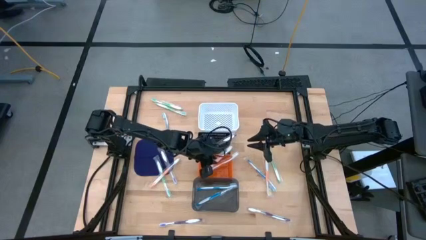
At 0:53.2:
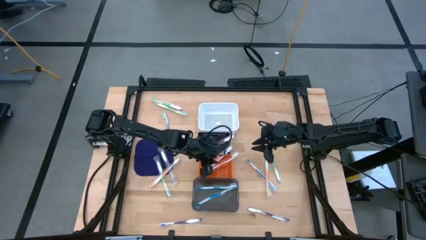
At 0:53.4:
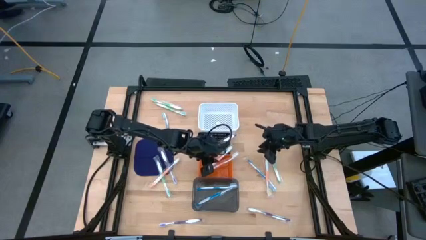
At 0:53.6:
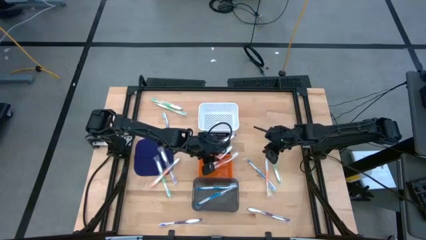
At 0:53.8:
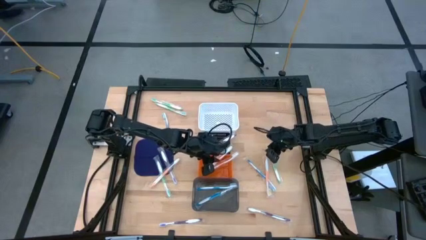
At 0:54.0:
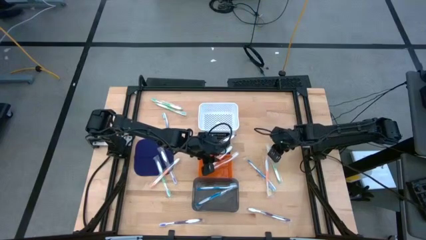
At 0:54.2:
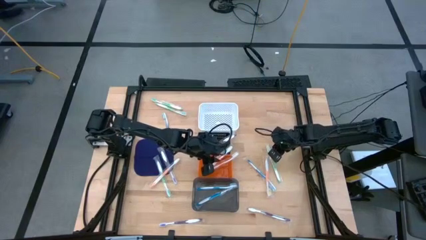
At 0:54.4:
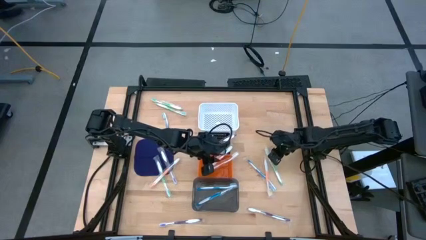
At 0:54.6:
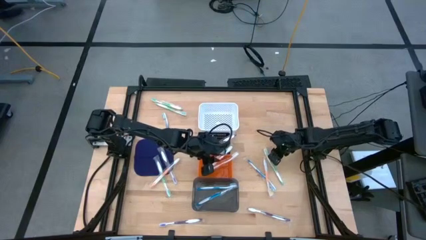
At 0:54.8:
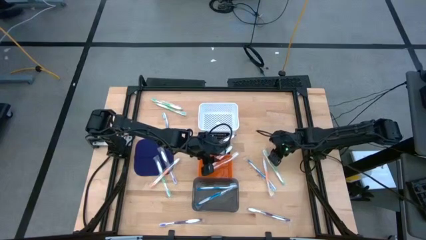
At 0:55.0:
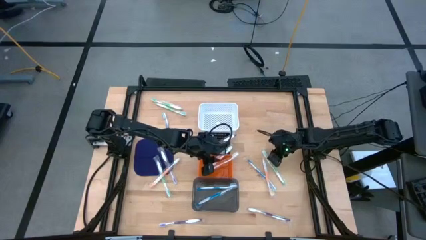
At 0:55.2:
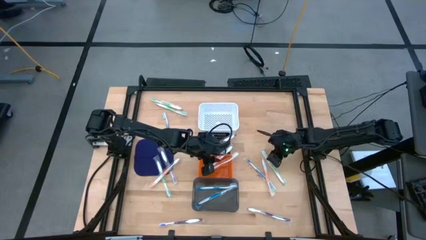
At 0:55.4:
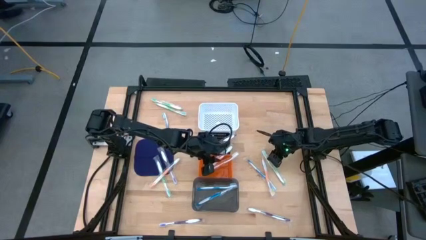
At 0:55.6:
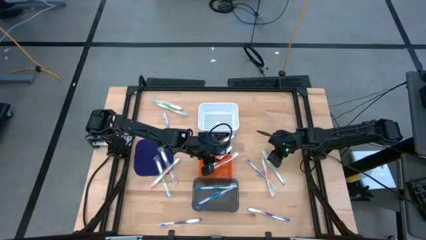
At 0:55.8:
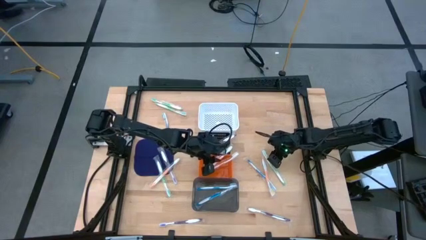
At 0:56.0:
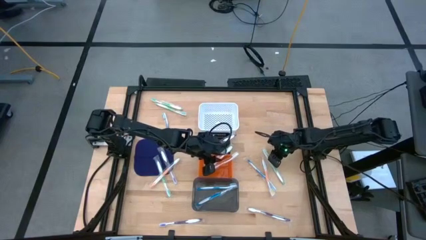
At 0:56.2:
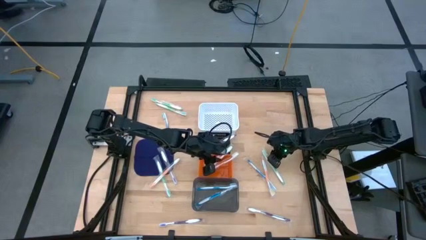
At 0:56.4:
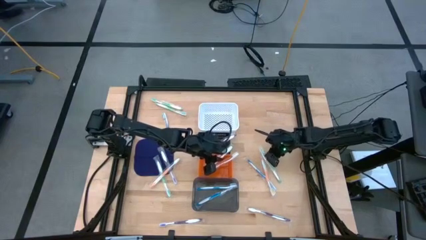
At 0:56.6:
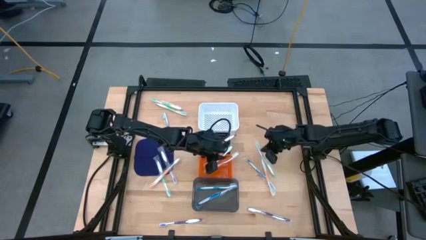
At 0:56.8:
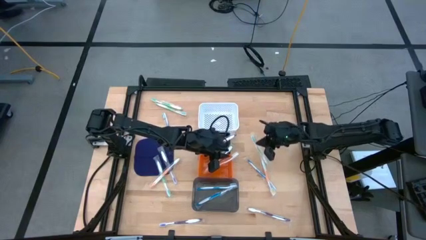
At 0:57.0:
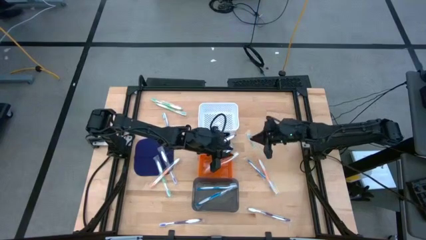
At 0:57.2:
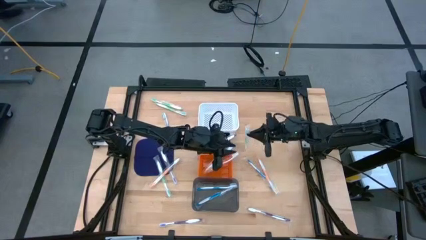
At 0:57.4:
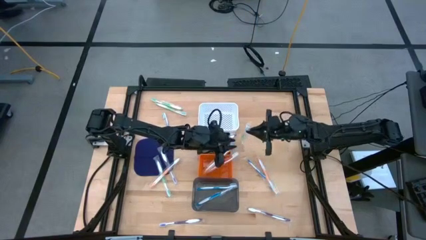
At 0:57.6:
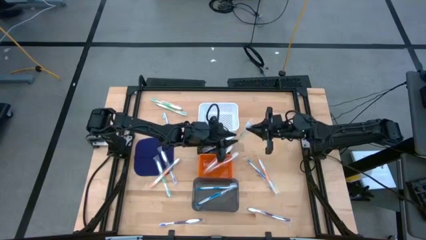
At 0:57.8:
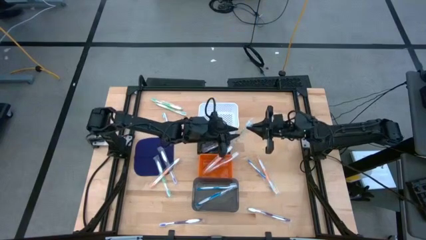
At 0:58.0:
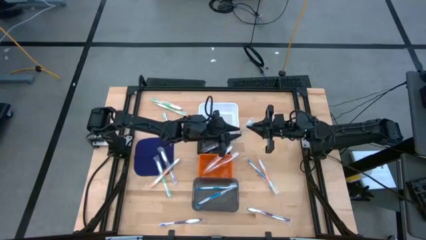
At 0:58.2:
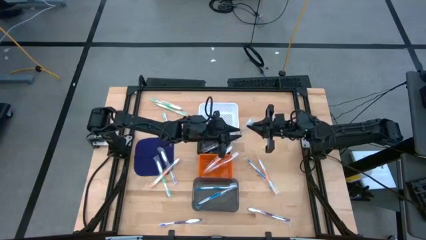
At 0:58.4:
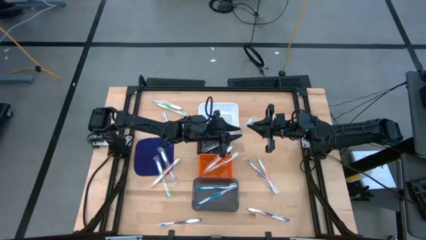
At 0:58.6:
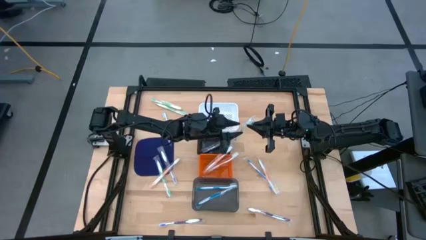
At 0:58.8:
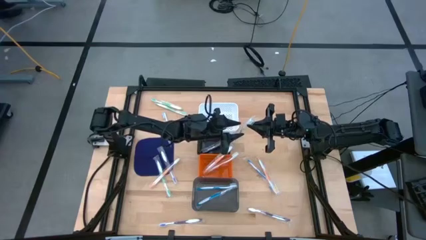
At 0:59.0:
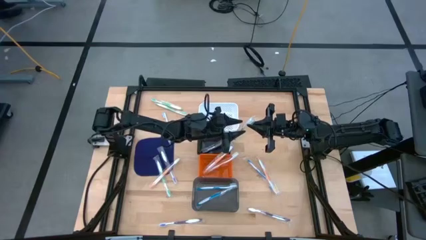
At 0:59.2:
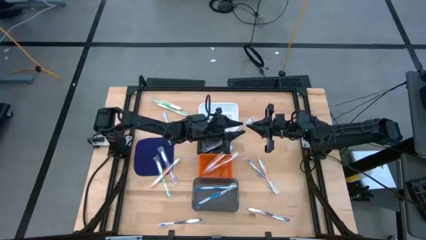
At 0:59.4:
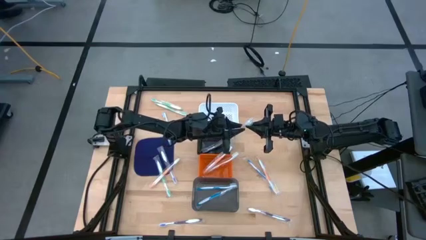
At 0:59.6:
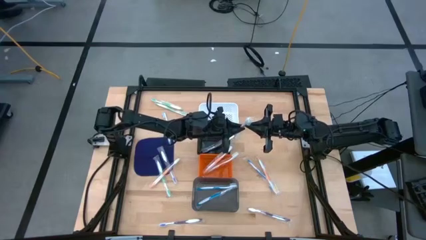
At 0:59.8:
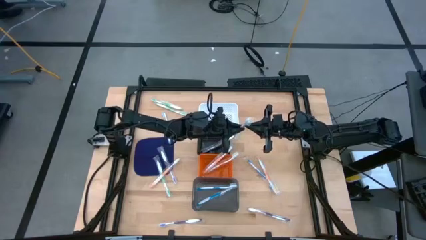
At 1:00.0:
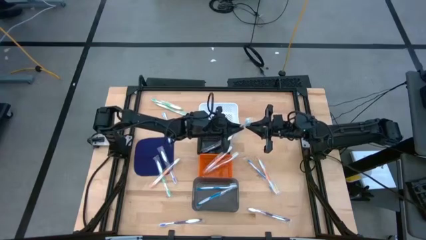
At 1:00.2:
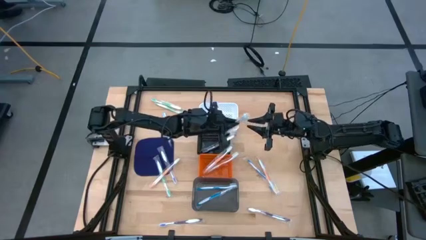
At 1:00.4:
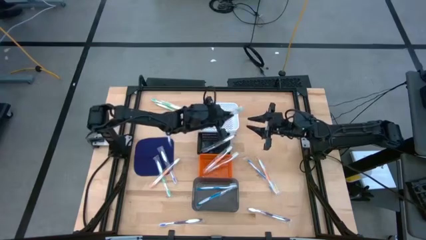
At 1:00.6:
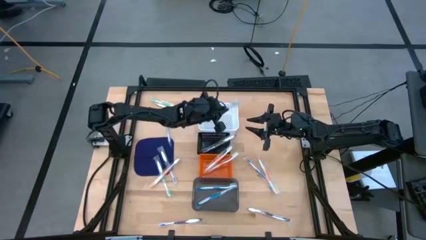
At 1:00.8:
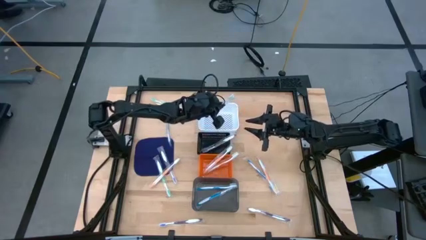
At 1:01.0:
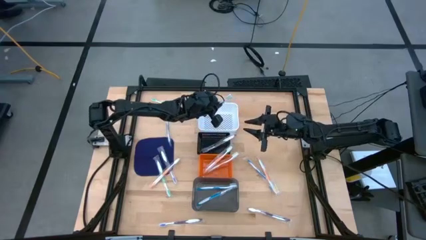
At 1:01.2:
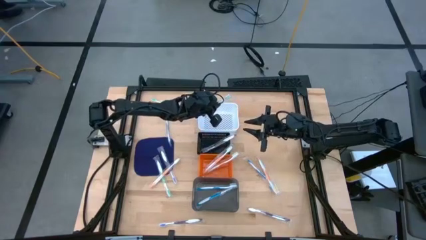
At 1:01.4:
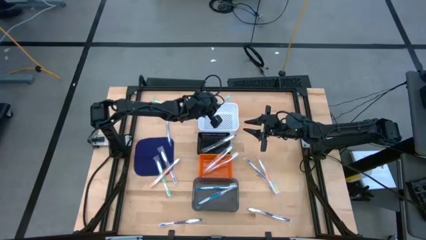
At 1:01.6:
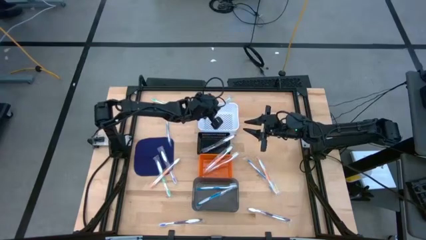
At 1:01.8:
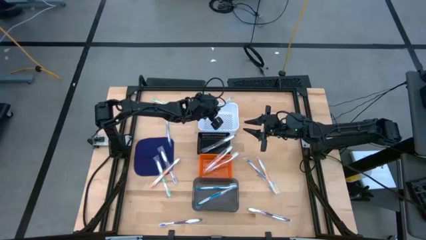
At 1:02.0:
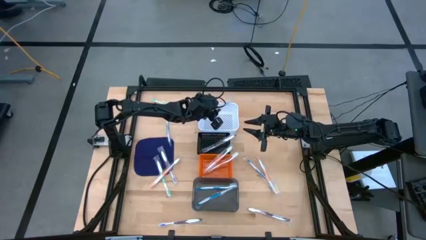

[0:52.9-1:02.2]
Task: Pick & Place Toothbrushes
Put the bottom right green toothbrush into the white bin

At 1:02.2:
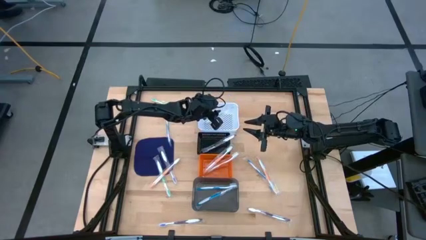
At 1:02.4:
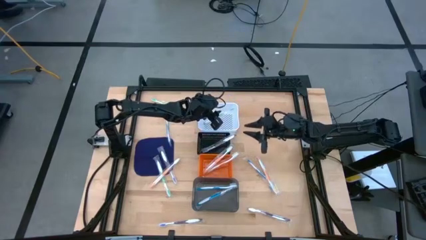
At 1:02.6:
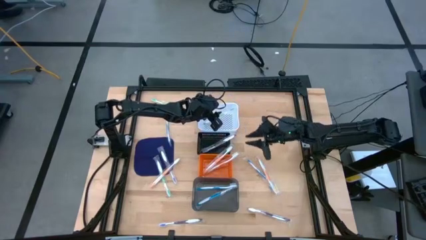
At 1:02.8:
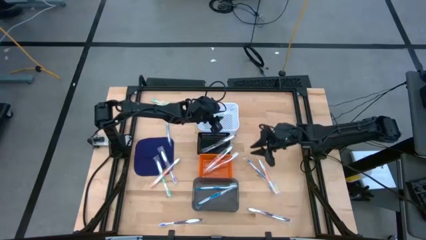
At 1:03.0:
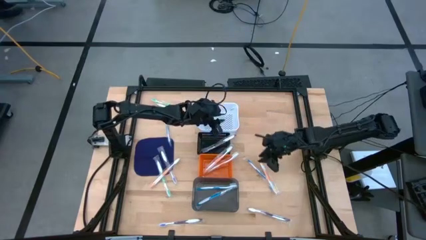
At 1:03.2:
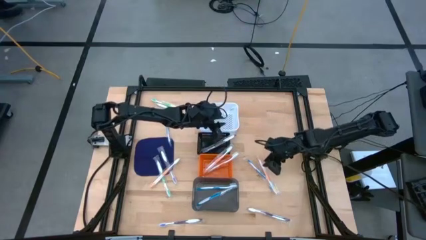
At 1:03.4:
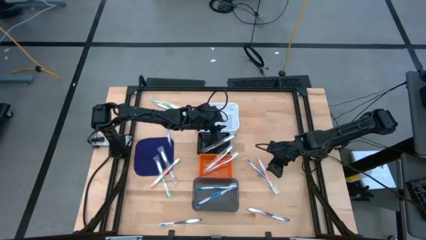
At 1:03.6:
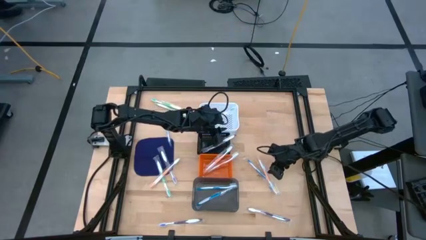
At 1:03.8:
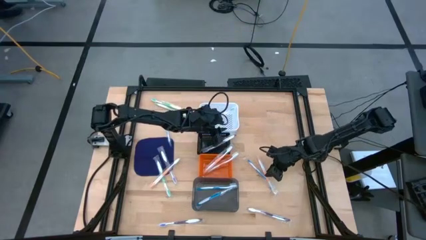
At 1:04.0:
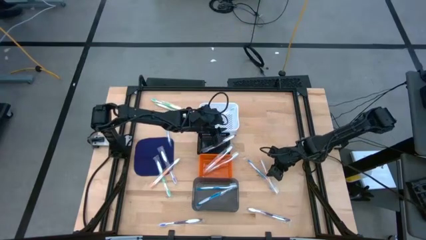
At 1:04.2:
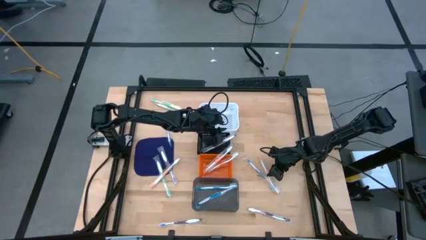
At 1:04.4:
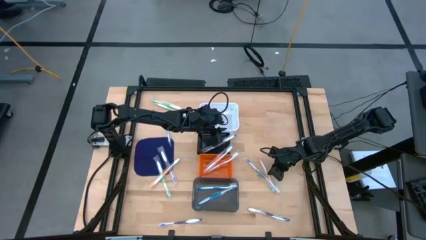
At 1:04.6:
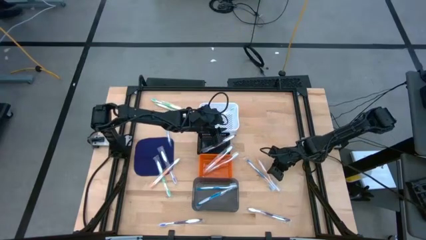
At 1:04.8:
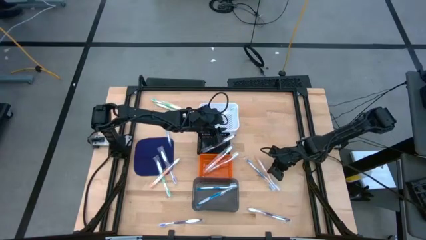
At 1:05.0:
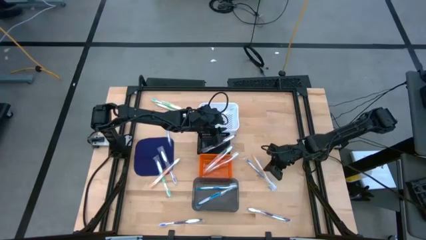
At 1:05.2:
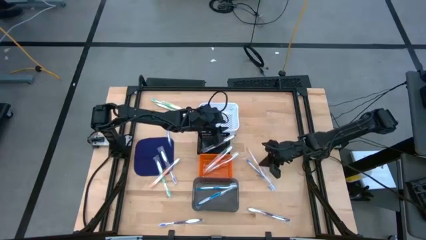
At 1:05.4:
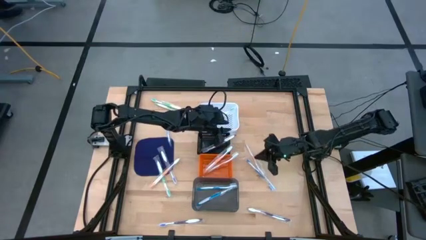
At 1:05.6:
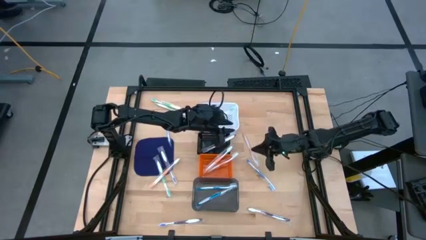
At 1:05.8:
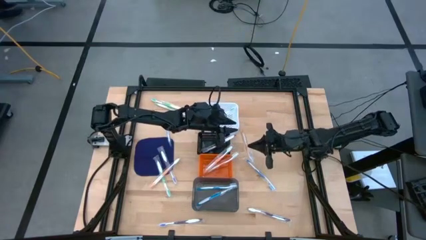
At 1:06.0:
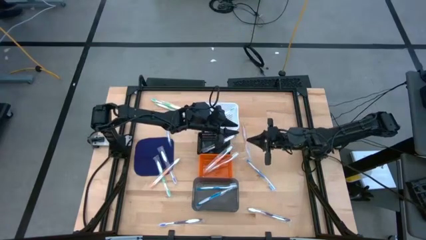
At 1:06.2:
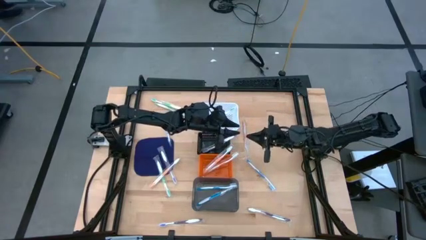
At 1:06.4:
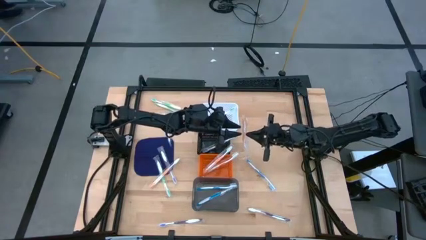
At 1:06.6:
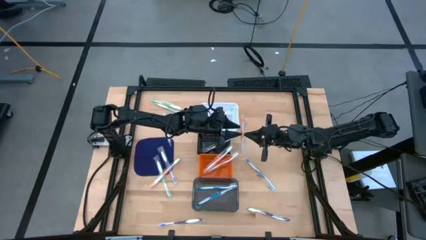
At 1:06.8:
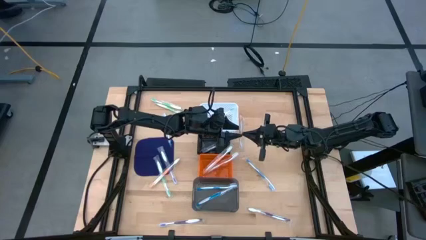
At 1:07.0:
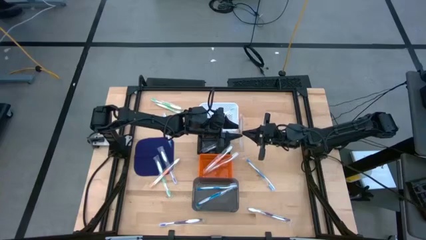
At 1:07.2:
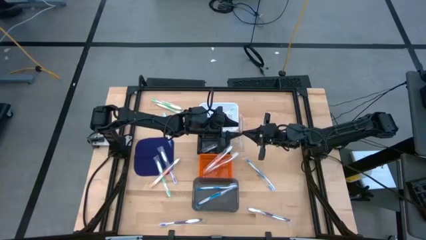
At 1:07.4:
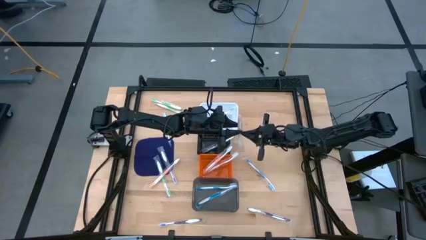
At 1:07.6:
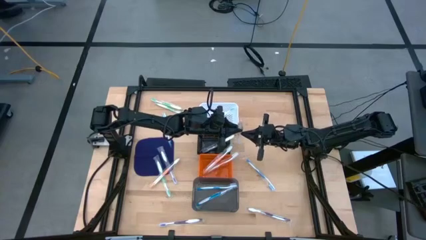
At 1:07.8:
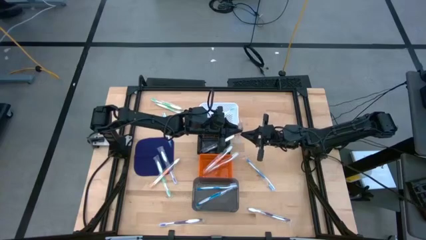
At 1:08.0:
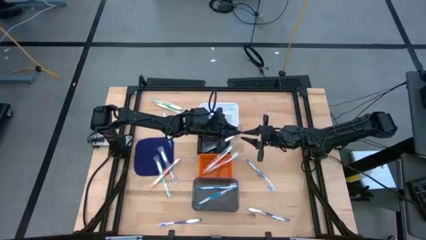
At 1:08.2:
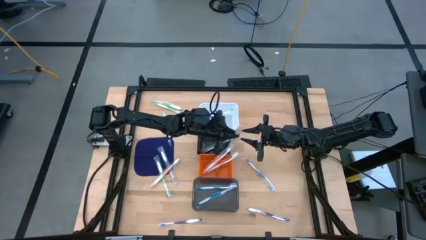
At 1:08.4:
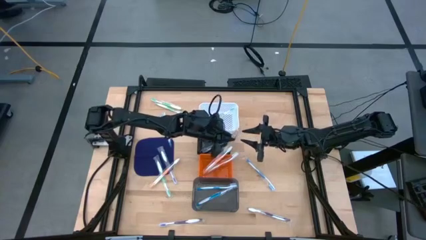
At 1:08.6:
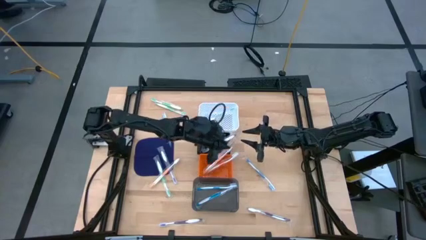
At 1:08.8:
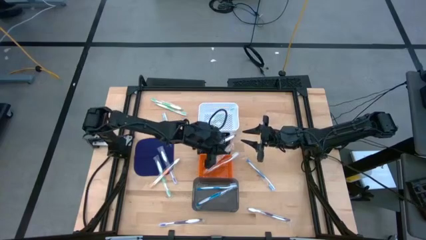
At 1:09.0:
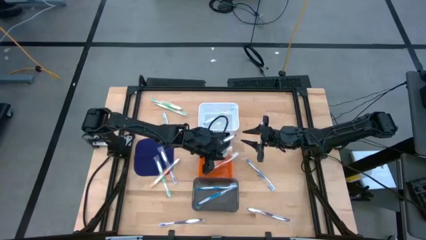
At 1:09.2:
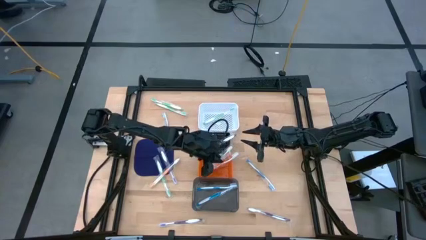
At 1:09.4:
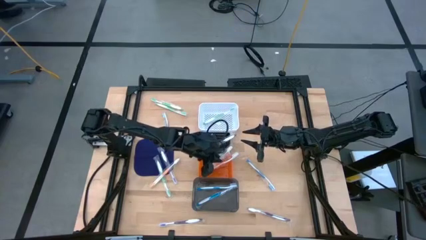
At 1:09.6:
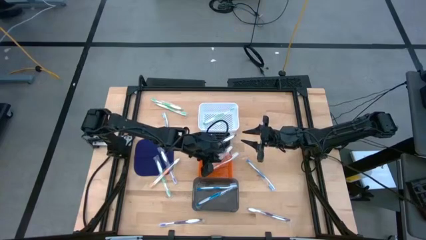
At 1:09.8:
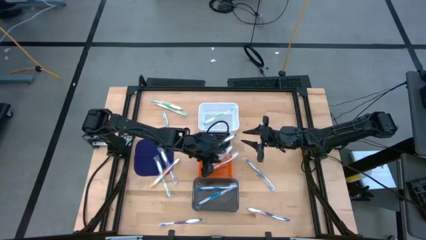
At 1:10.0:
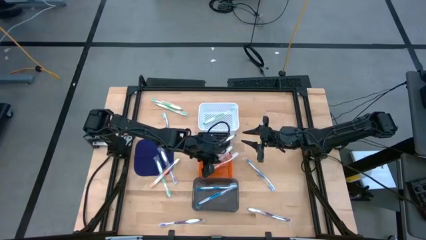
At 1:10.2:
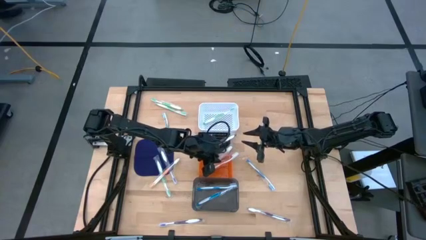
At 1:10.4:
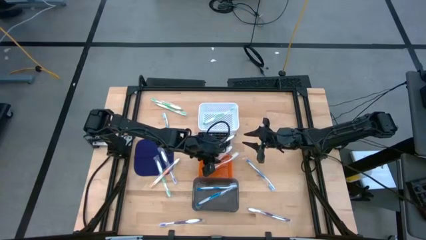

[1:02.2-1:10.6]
Put the right orange toothbrush into the orange bin
